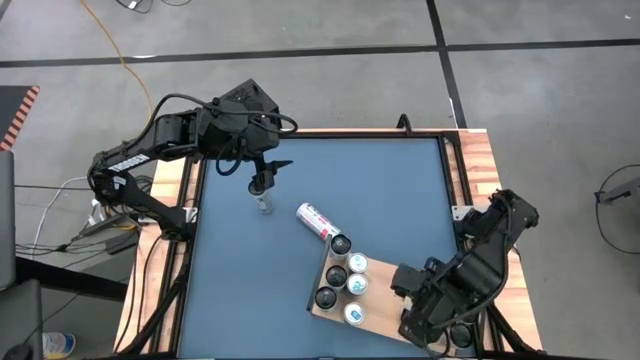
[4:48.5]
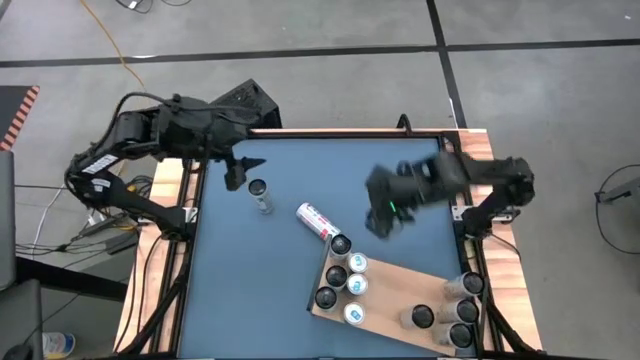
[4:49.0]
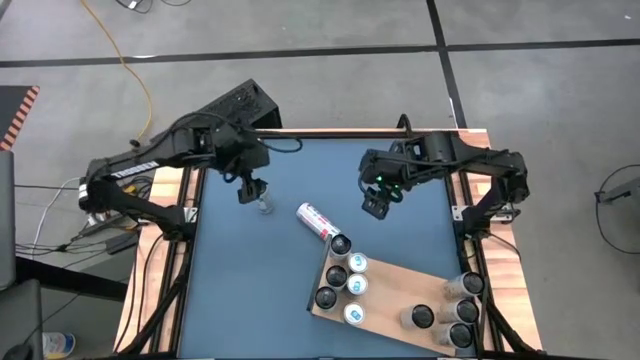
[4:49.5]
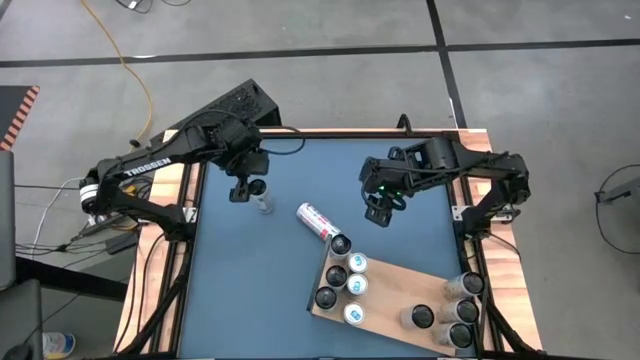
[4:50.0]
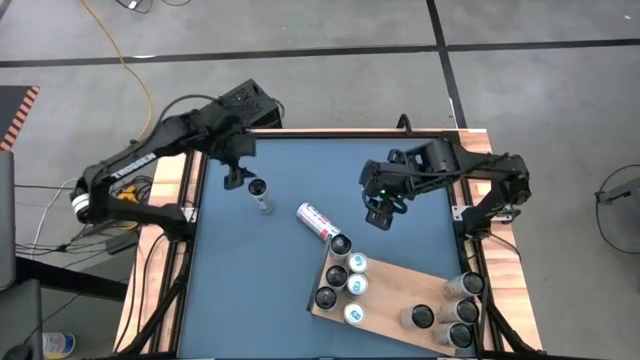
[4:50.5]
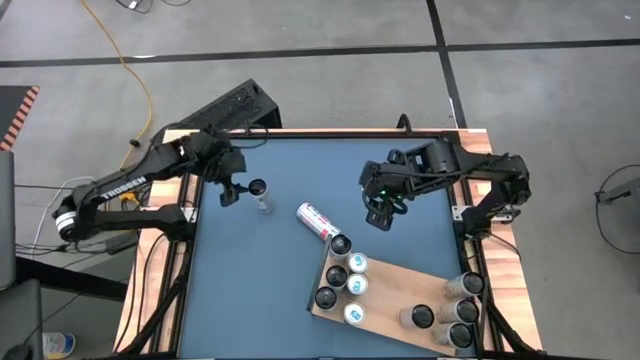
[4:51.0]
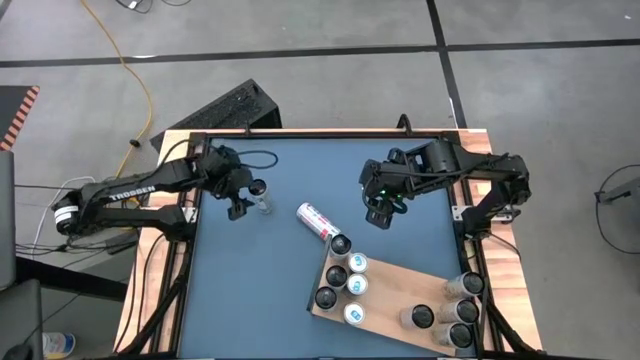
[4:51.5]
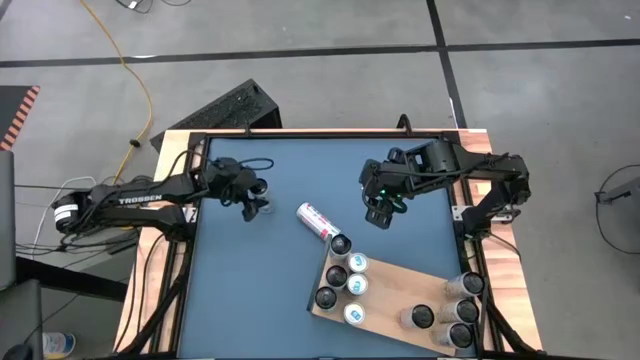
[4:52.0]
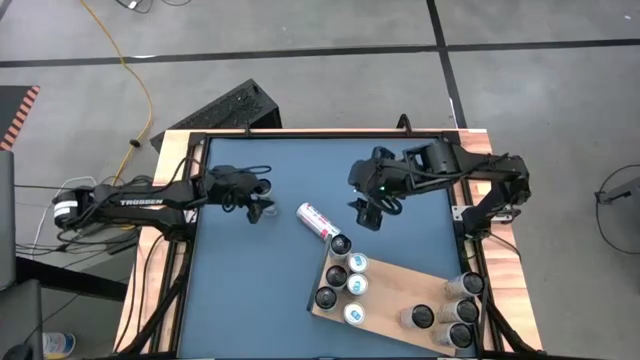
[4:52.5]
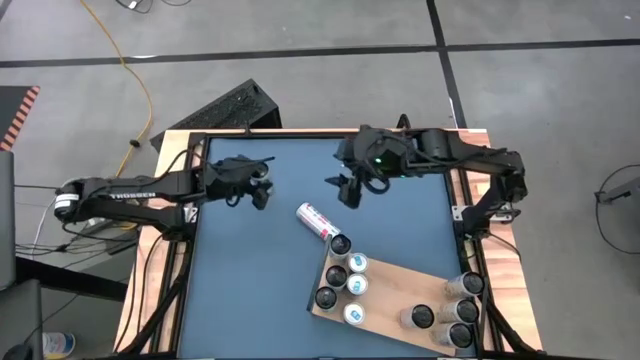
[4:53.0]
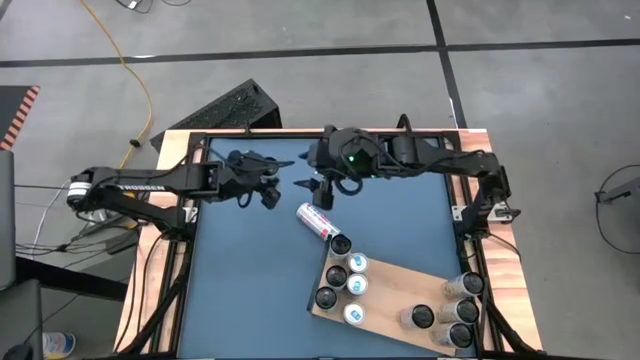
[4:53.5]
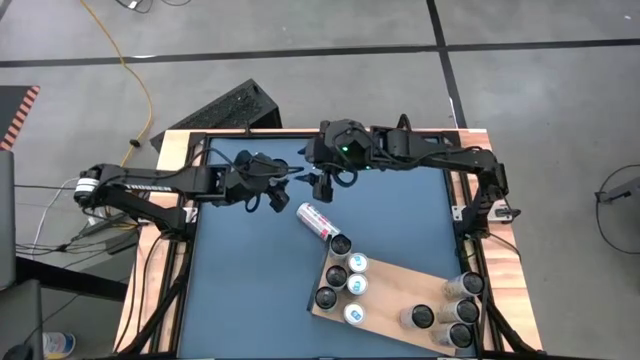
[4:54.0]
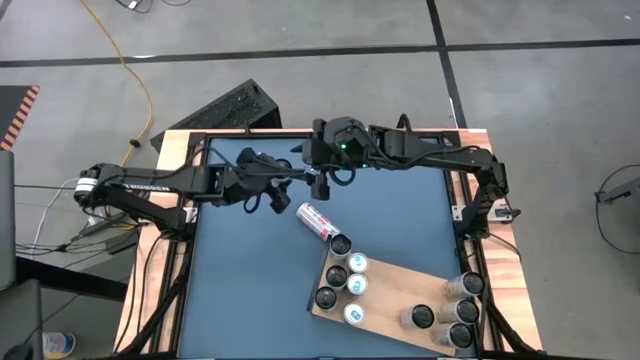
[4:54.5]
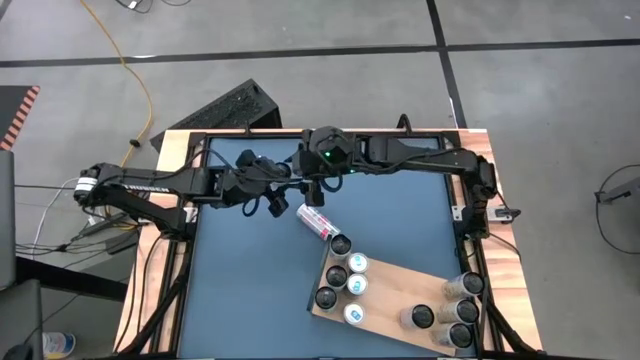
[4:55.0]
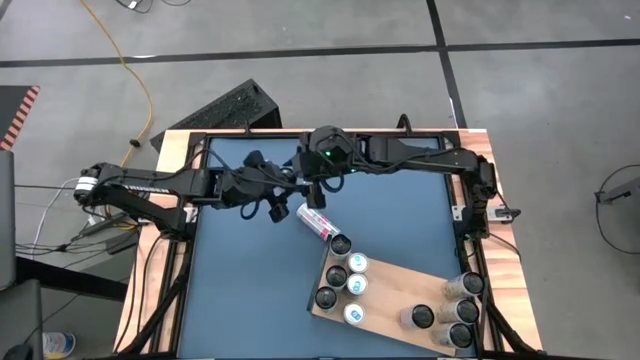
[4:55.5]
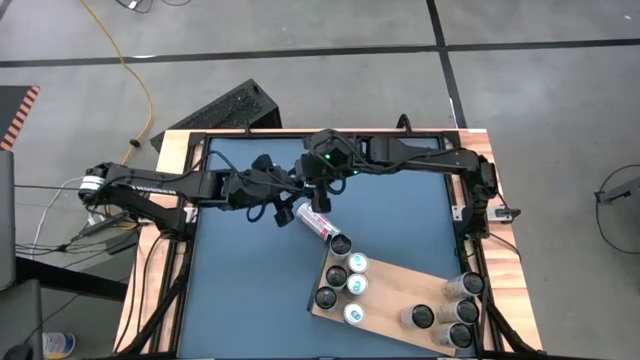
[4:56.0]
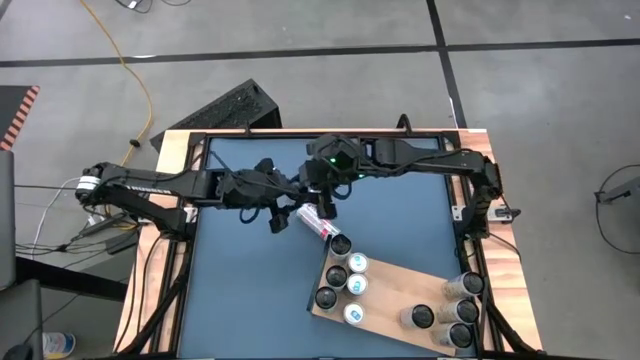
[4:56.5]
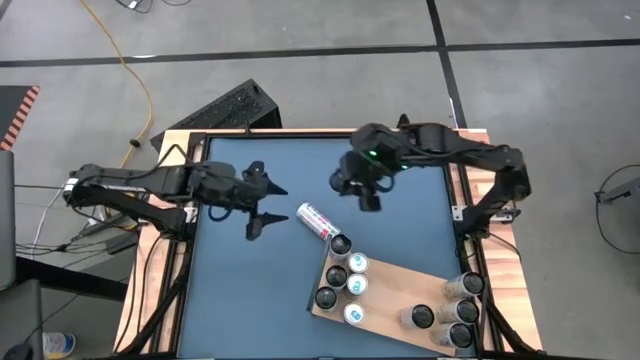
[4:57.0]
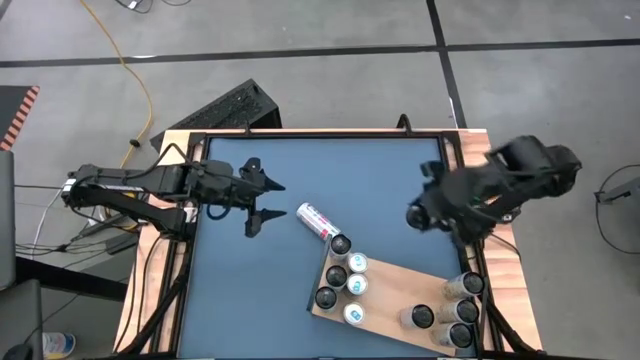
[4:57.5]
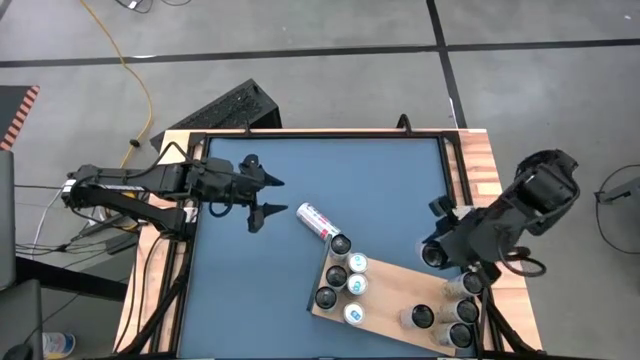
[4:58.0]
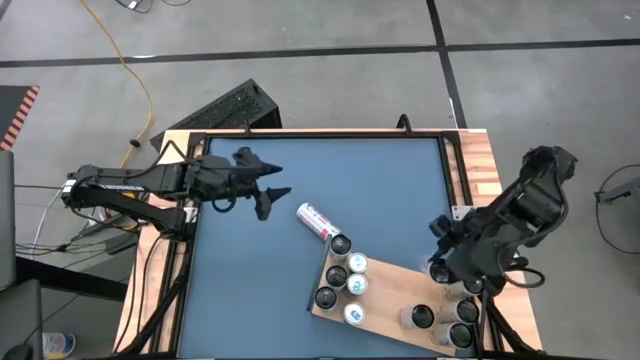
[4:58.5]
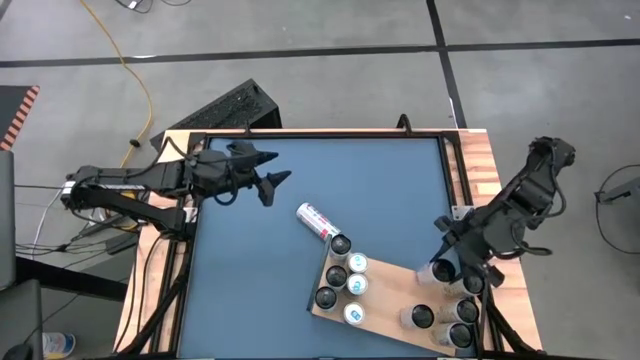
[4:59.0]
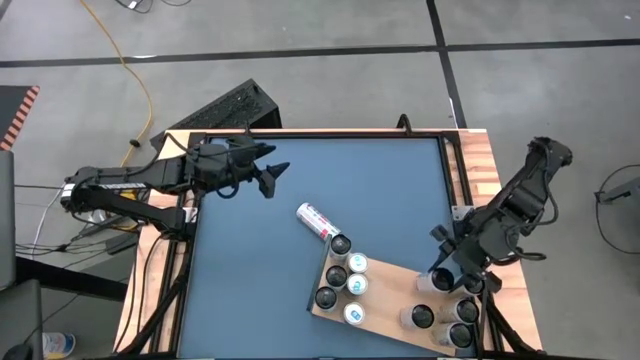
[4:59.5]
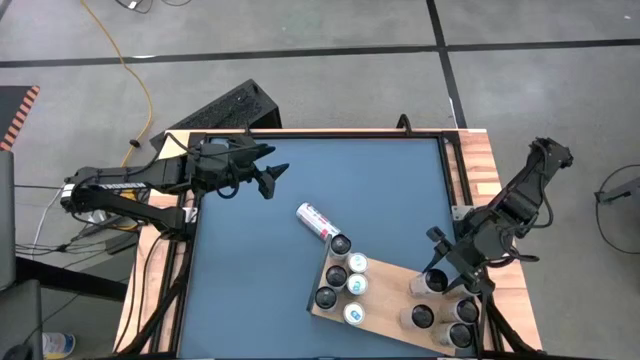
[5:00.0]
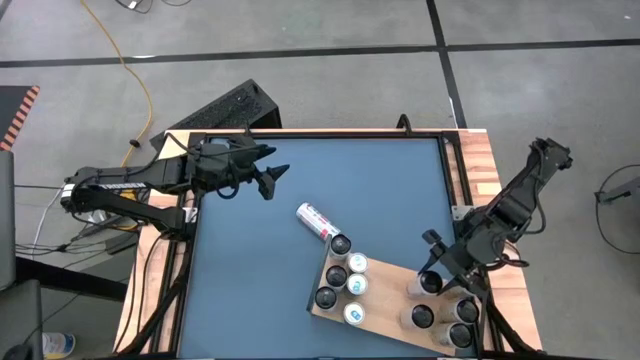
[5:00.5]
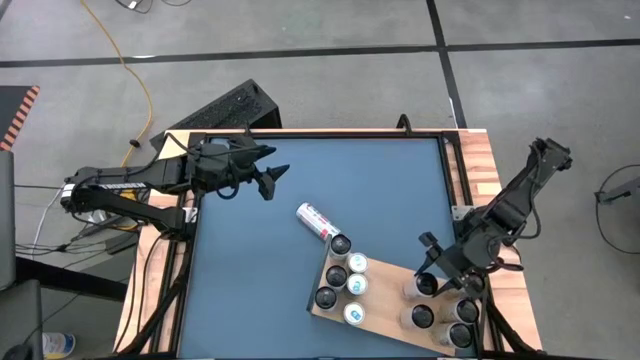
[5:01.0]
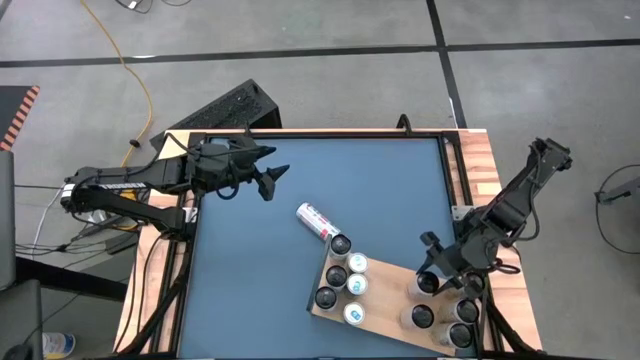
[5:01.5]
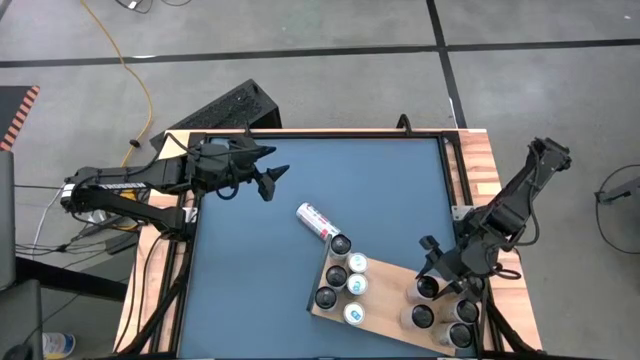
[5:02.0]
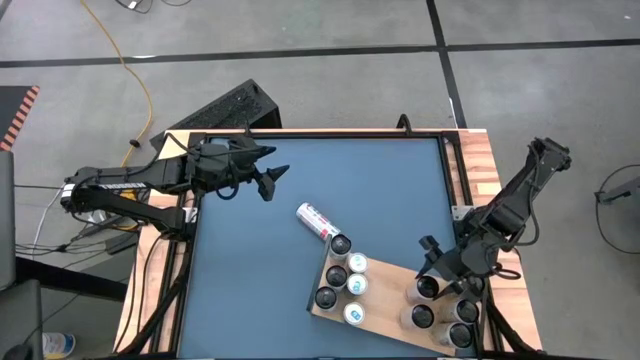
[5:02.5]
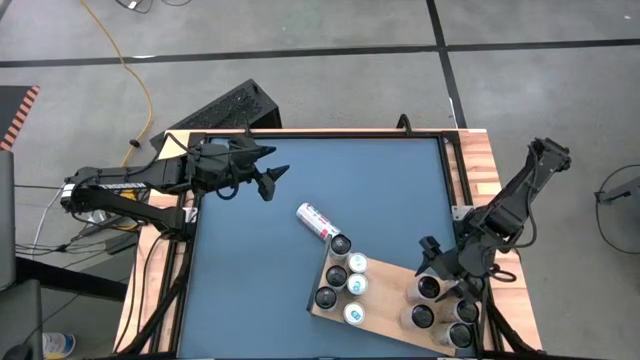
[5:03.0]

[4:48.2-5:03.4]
Task: Place canned beverage on shelf
Put the left white pink soda can on the shelf

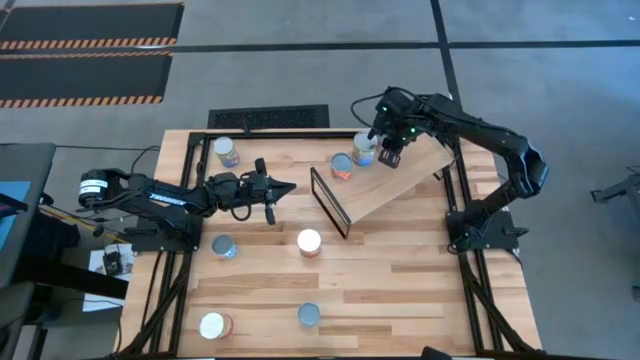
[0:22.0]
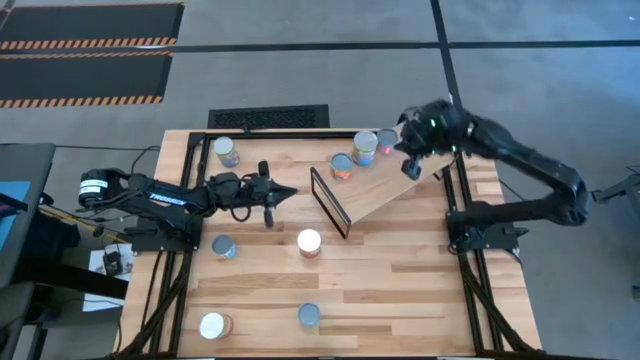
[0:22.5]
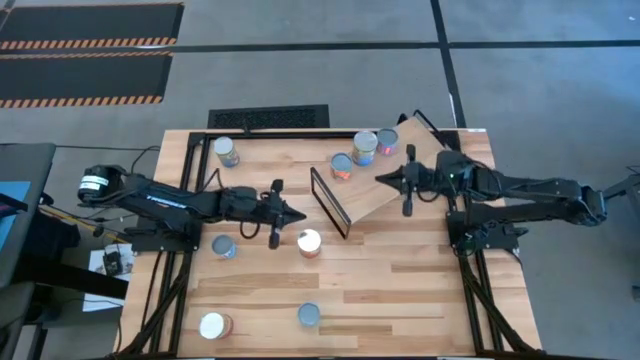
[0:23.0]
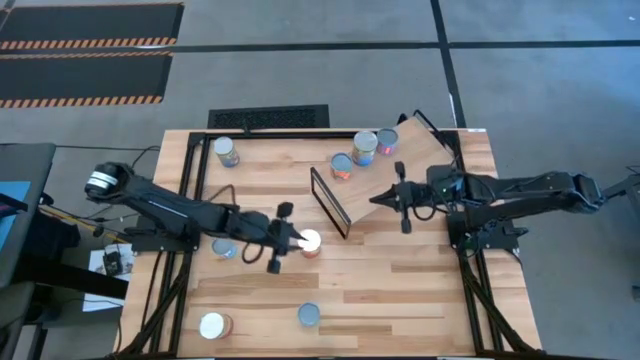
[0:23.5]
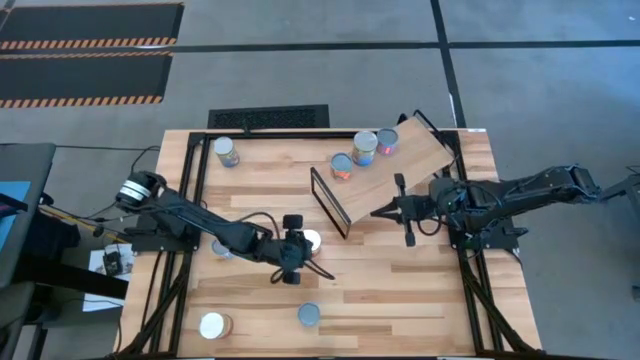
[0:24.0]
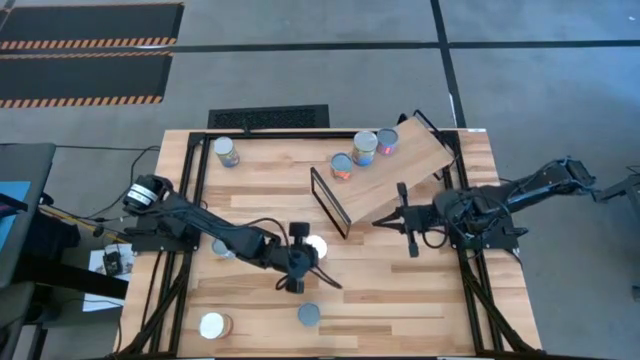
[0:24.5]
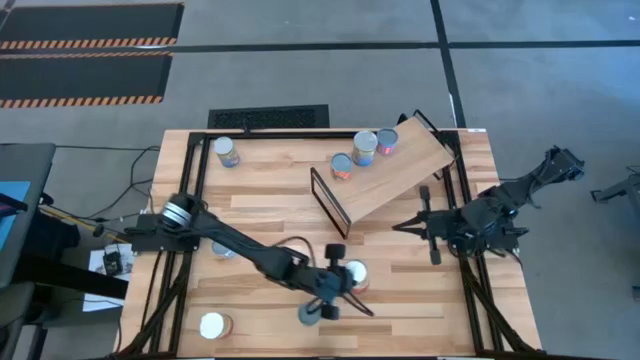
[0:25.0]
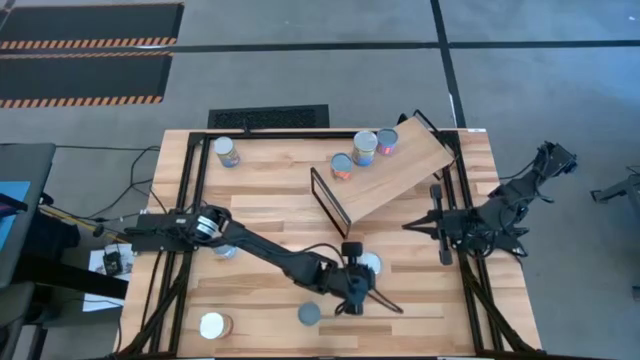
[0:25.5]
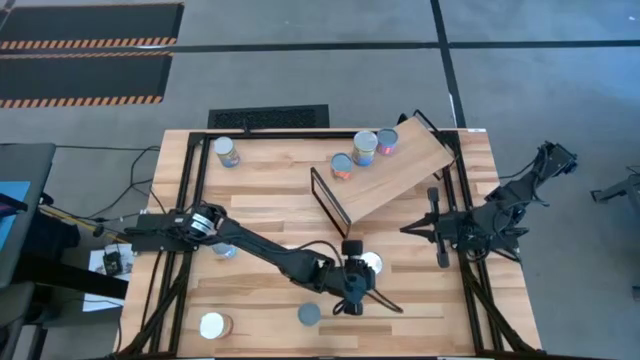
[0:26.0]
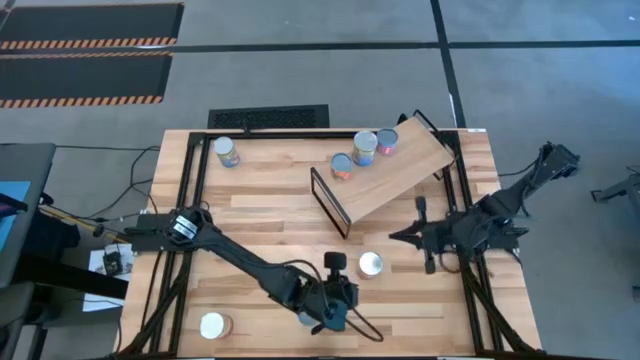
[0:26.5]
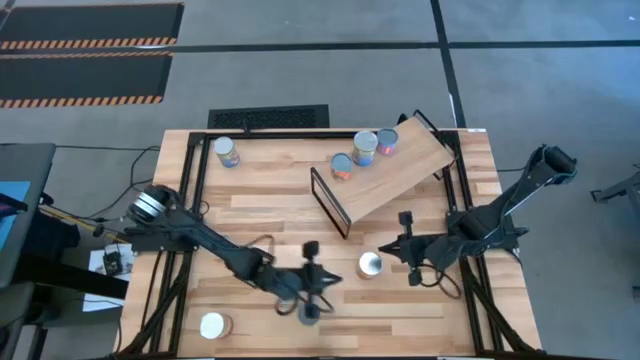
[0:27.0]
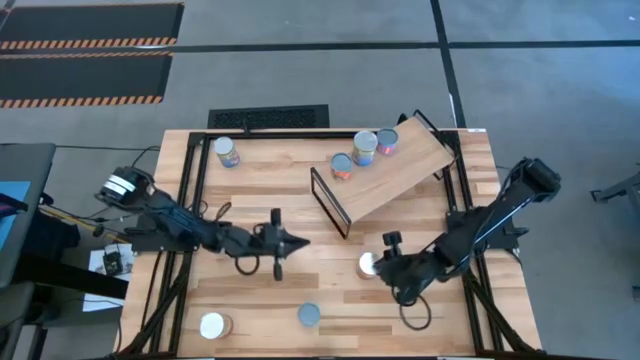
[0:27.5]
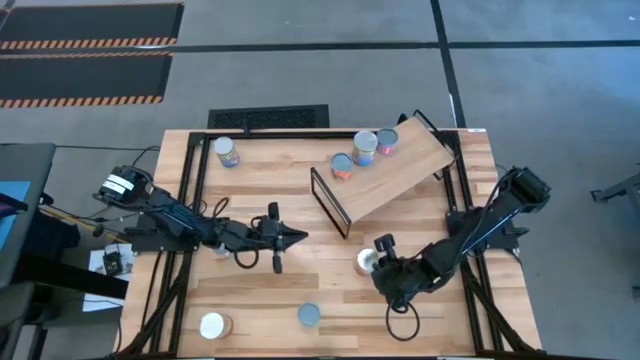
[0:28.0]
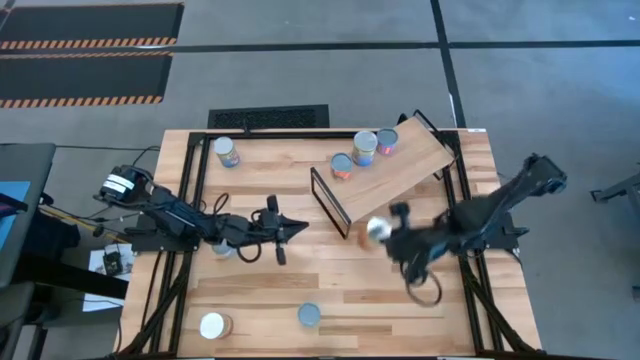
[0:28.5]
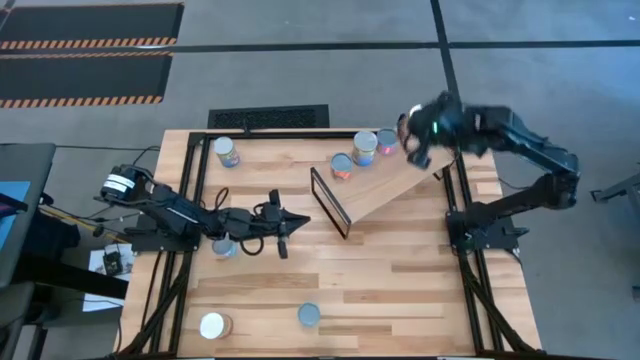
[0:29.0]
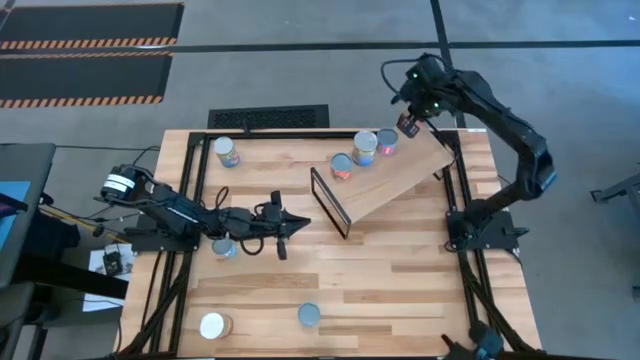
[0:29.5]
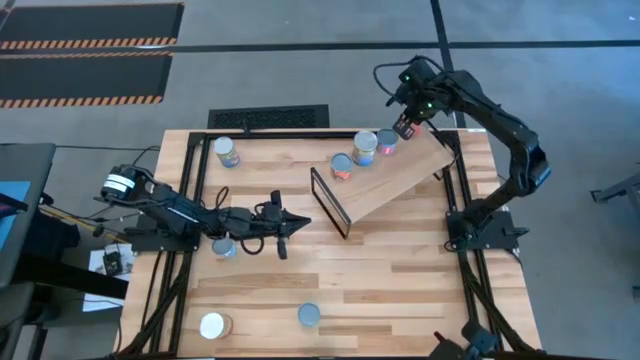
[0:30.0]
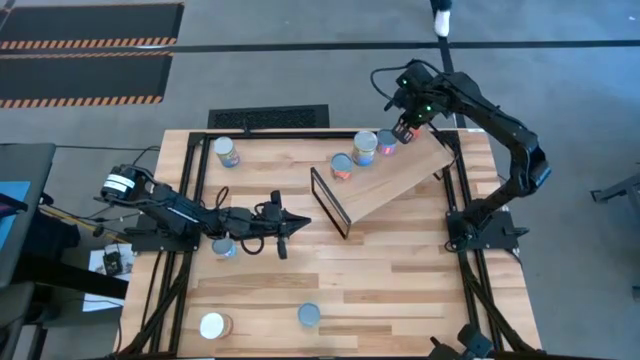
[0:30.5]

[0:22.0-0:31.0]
Task: Pick and place cans onto a shelf
Put the canned corn on the shelf
